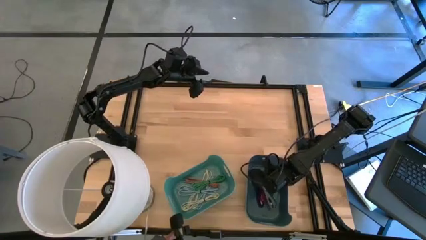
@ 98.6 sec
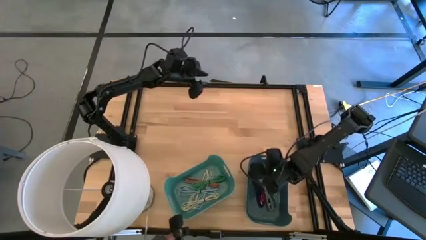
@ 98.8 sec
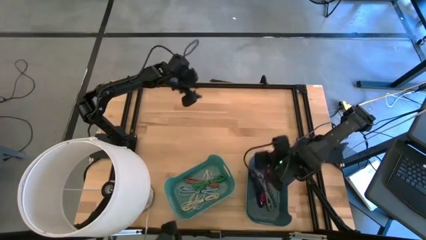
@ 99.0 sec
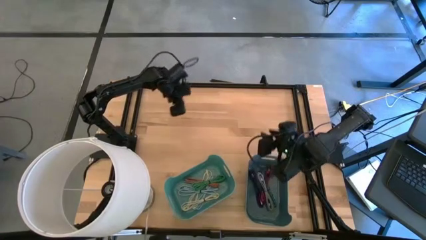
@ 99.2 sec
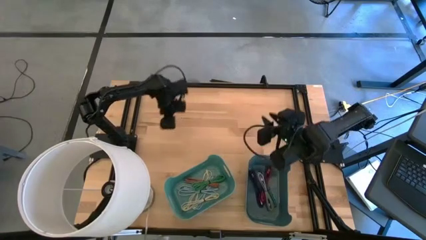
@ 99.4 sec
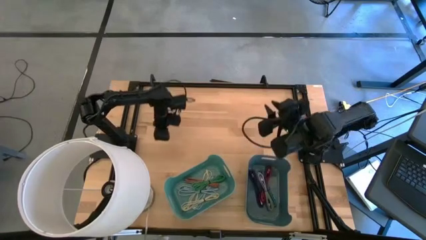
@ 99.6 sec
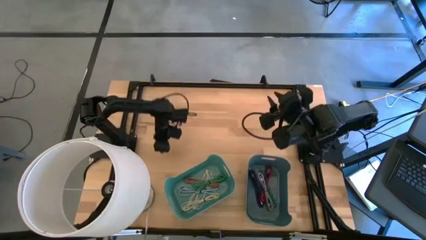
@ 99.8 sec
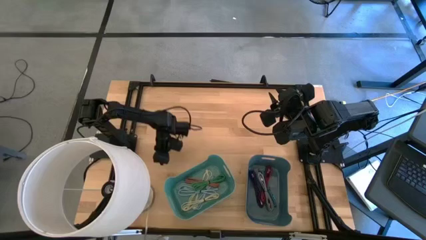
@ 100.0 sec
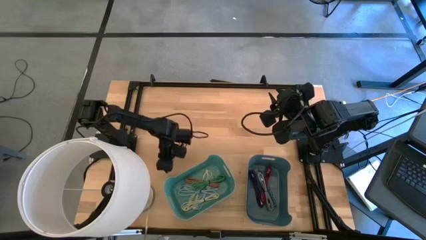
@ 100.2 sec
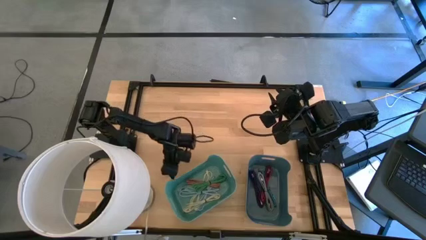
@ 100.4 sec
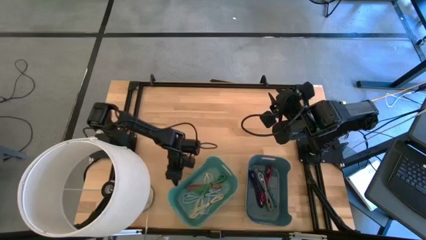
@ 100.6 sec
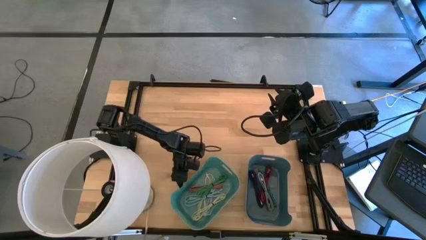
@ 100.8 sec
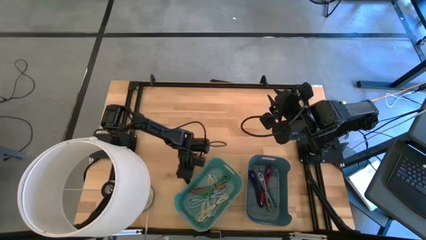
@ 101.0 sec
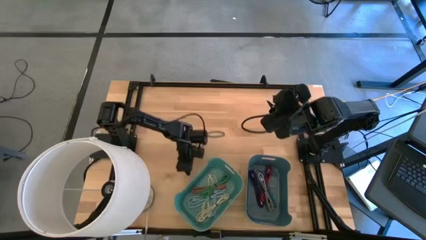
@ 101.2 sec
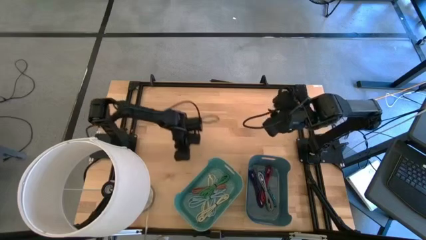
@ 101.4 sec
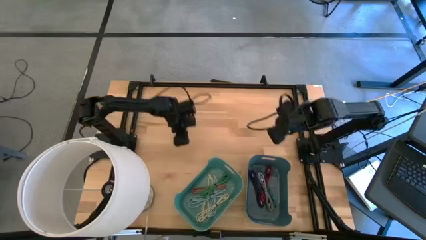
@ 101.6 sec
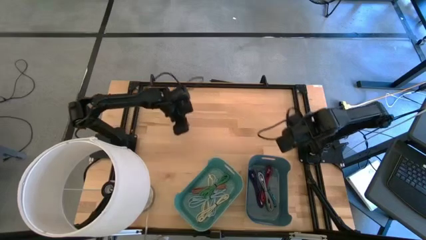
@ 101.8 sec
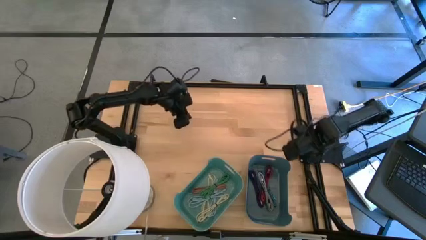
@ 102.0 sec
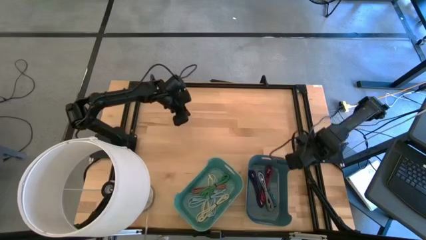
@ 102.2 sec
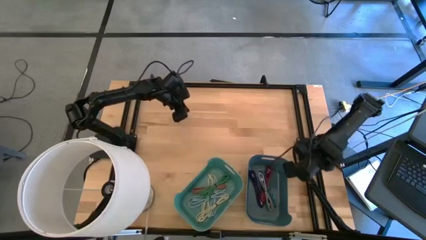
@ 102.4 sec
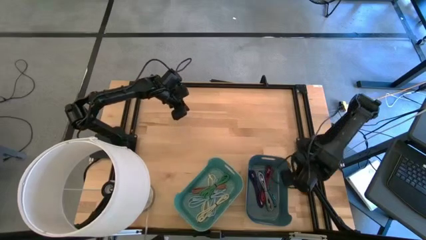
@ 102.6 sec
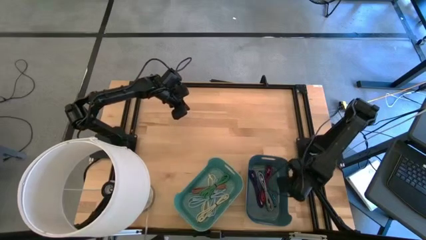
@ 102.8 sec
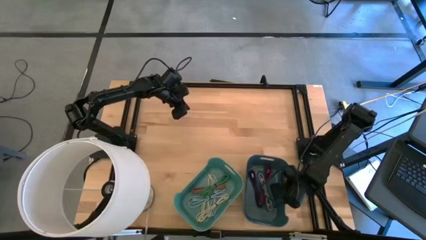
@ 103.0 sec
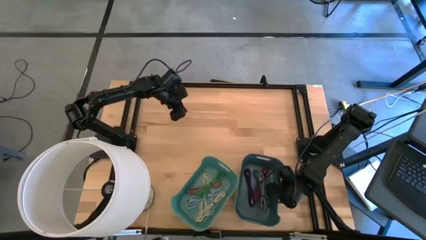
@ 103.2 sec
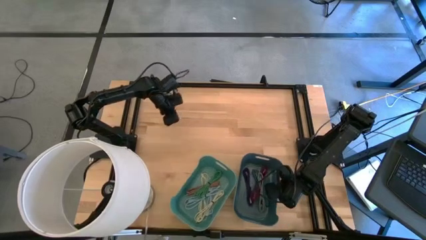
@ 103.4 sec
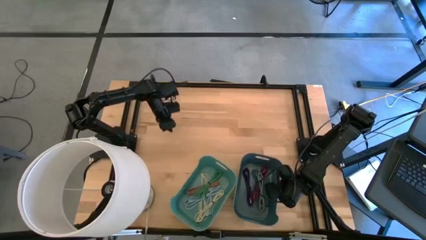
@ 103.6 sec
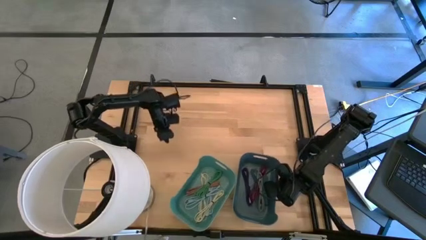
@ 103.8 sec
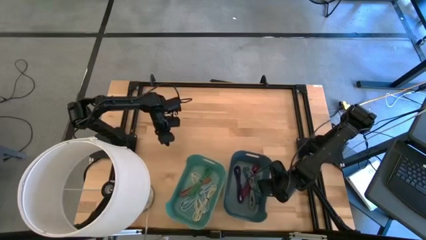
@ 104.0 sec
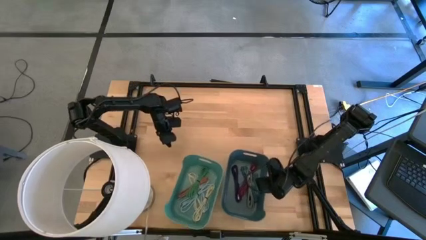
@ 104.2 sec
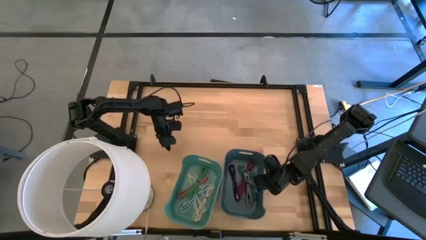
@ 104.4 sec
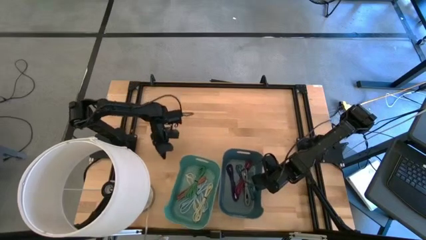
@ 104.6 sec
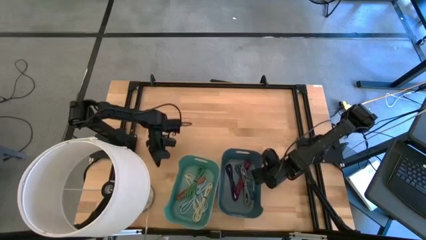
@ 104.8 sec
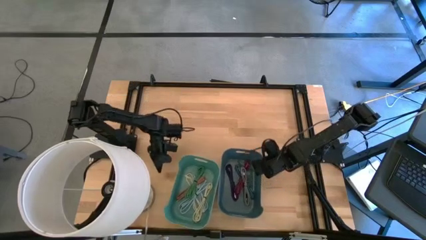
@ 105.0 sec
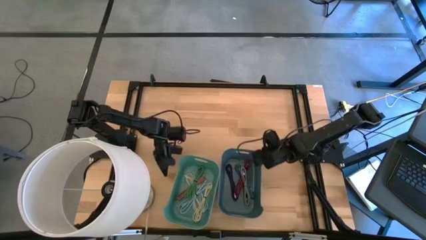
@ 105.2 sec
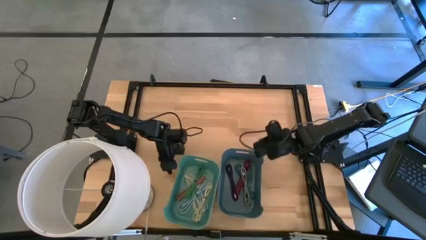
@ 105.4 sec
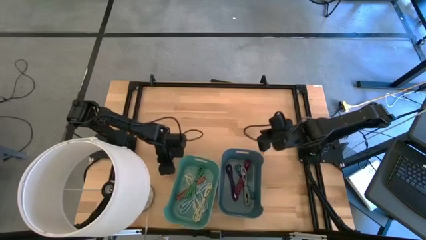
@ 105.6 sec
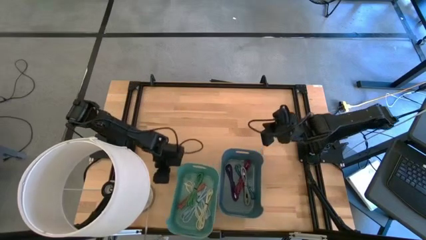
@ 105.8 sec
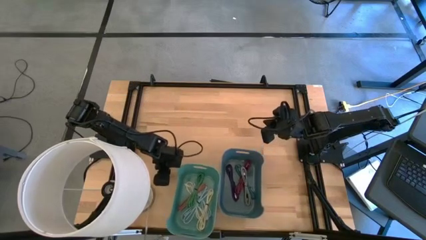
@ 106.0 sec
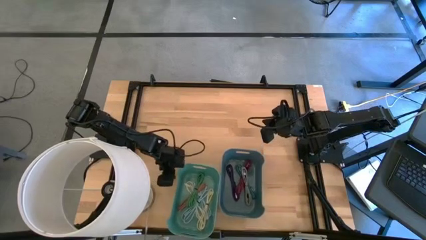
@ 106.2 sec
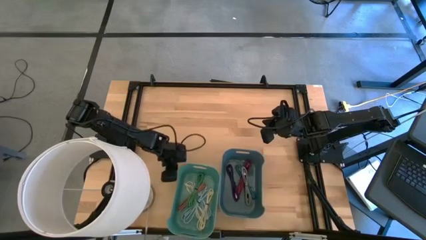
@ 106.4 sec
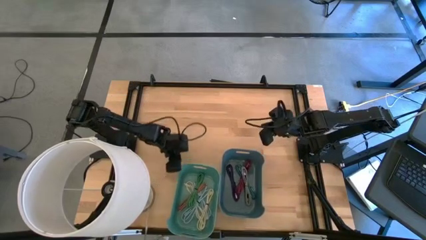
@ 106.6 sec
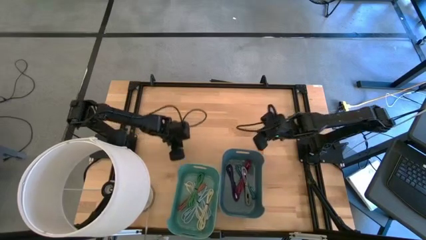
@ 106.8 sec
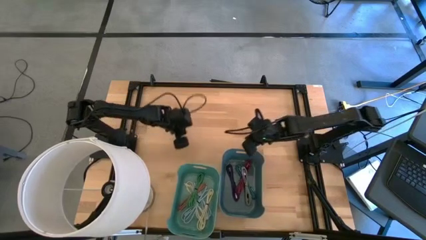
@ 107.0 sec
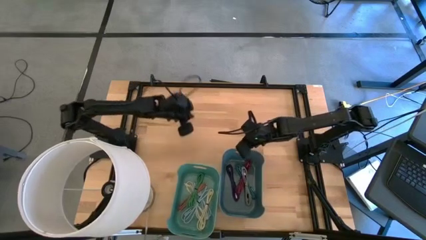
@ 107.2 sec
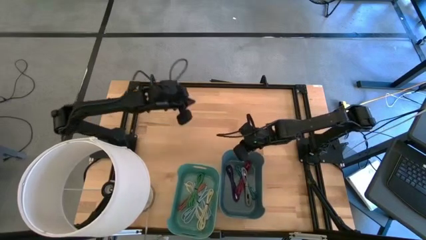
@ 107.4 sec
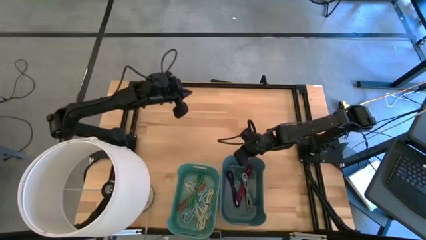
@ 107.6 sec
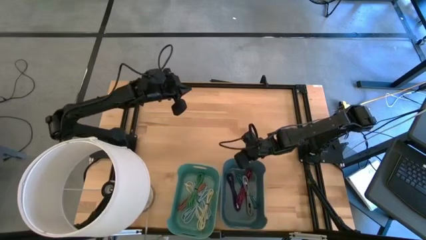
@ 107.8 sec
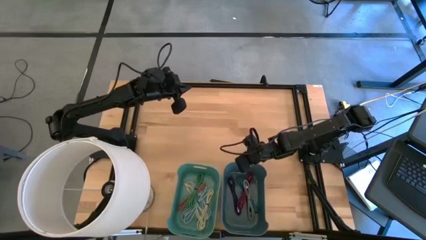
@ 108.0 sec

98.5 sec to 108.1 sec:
Adjust the bins

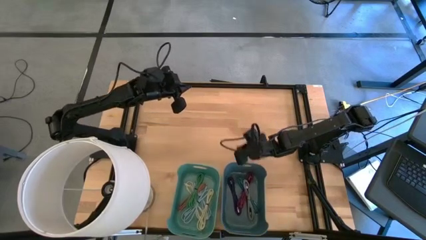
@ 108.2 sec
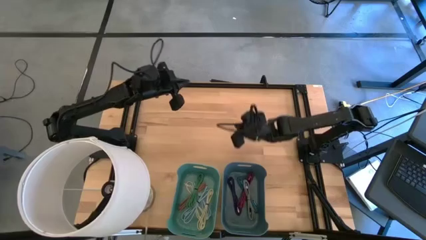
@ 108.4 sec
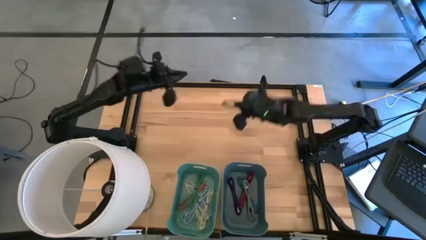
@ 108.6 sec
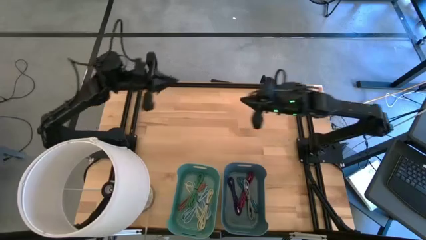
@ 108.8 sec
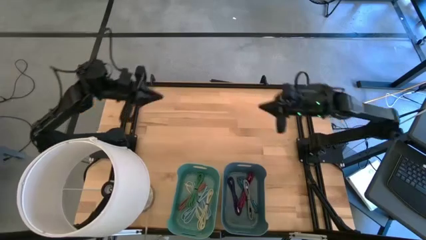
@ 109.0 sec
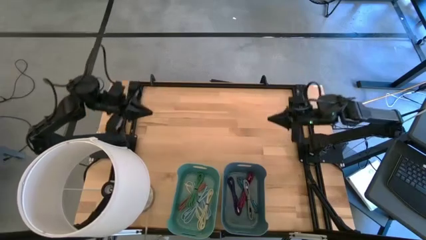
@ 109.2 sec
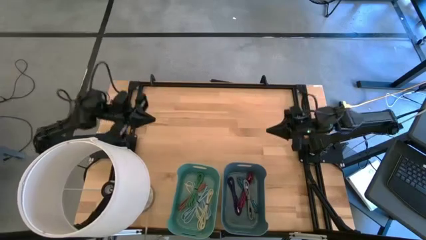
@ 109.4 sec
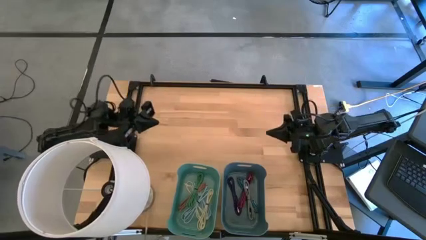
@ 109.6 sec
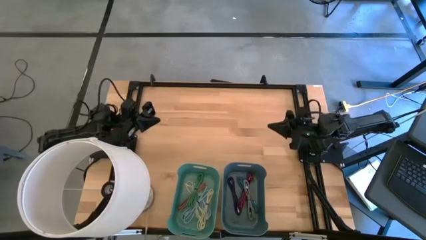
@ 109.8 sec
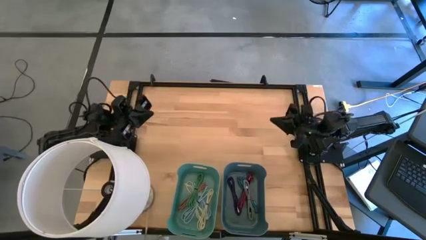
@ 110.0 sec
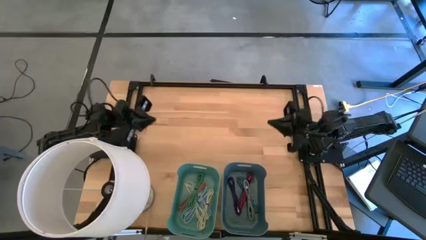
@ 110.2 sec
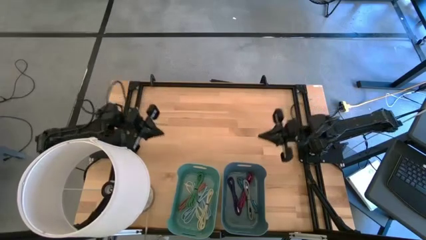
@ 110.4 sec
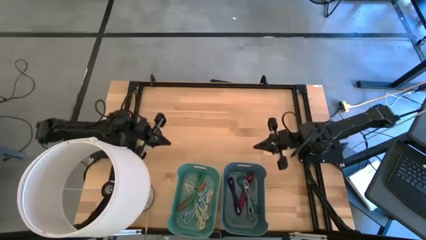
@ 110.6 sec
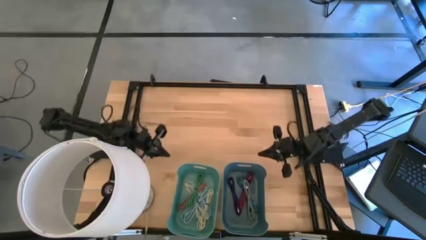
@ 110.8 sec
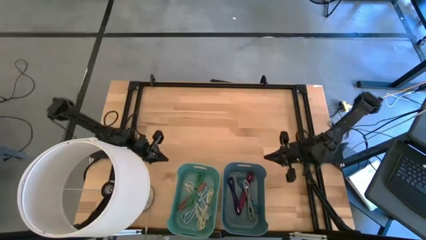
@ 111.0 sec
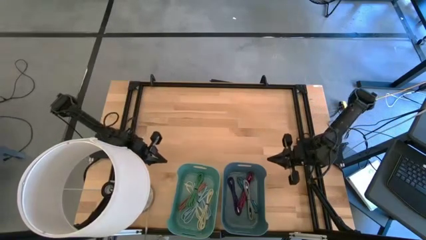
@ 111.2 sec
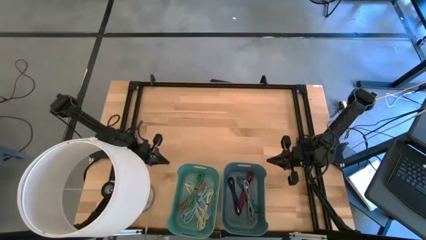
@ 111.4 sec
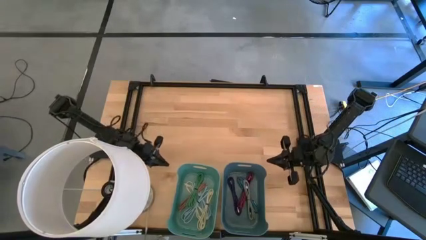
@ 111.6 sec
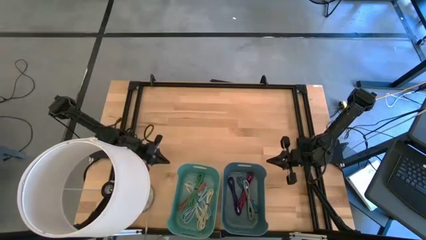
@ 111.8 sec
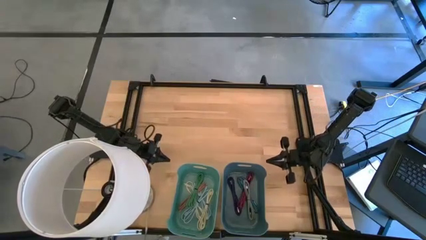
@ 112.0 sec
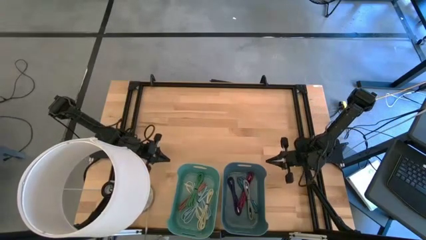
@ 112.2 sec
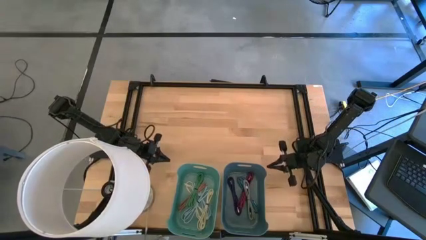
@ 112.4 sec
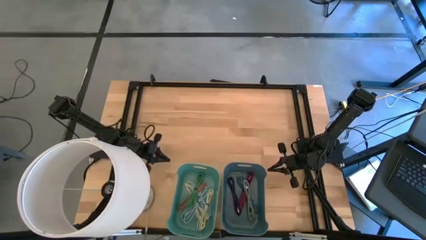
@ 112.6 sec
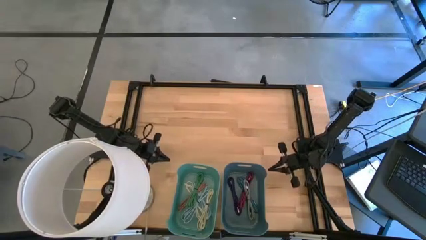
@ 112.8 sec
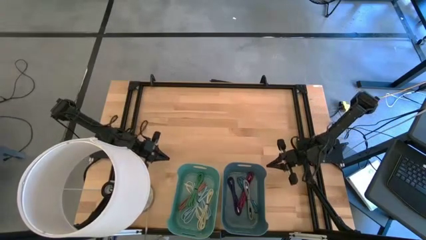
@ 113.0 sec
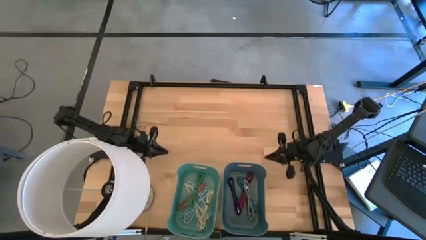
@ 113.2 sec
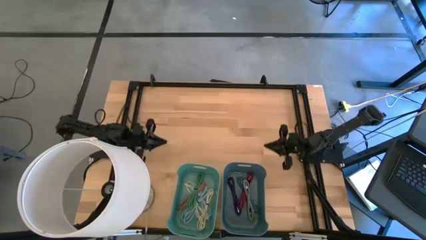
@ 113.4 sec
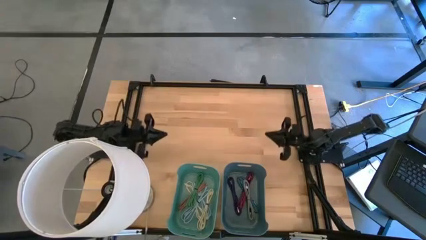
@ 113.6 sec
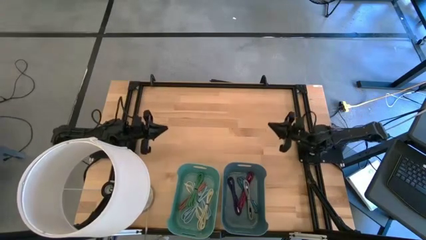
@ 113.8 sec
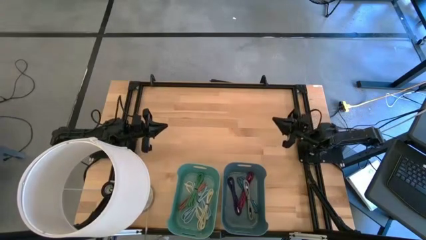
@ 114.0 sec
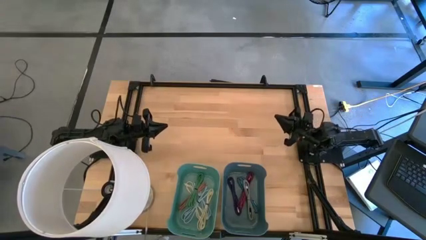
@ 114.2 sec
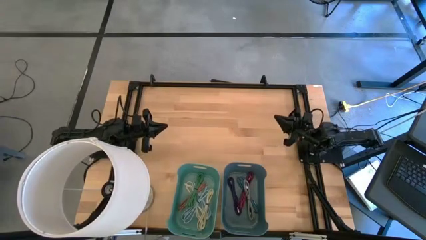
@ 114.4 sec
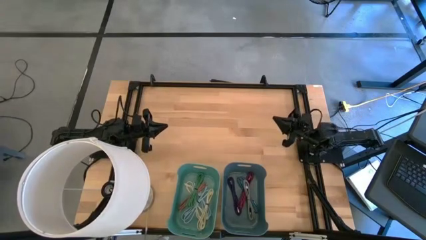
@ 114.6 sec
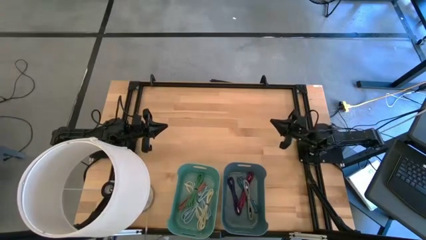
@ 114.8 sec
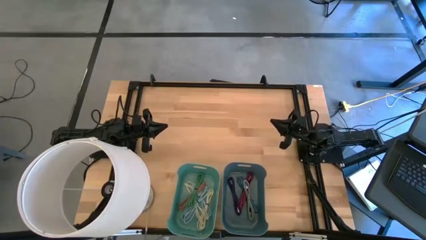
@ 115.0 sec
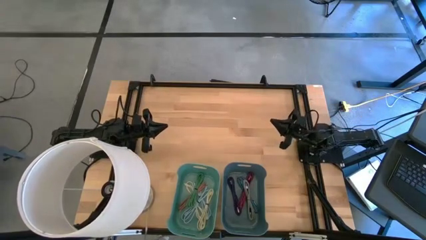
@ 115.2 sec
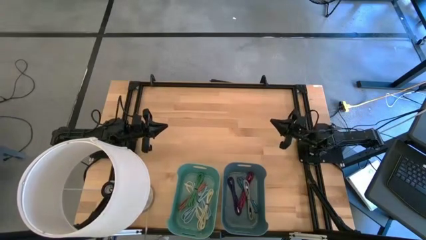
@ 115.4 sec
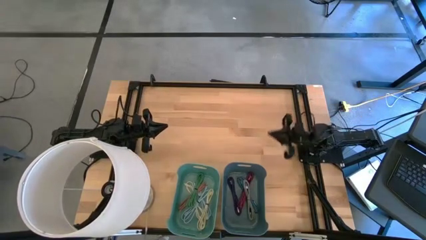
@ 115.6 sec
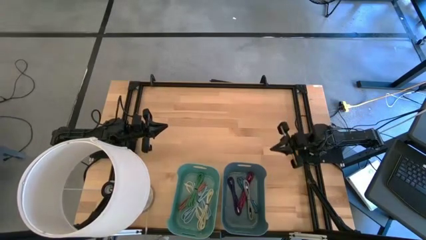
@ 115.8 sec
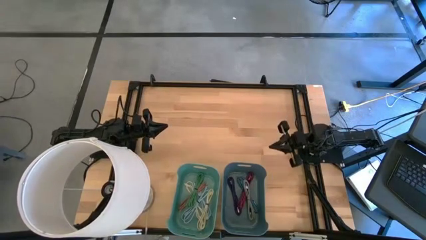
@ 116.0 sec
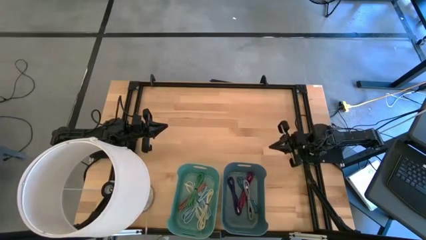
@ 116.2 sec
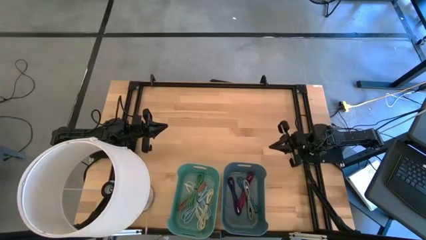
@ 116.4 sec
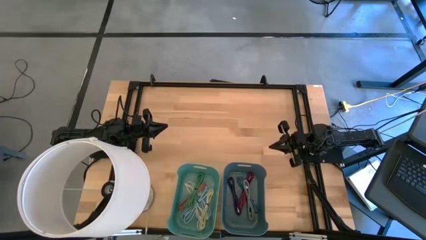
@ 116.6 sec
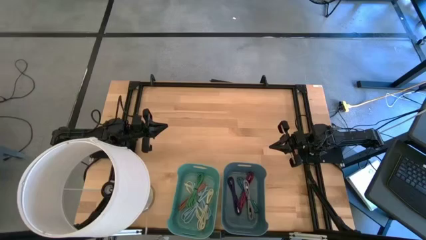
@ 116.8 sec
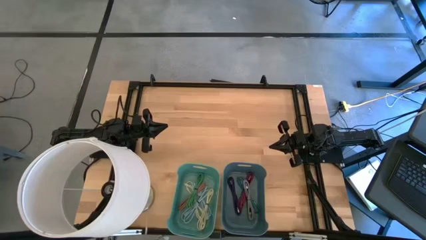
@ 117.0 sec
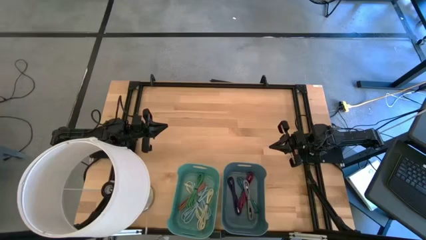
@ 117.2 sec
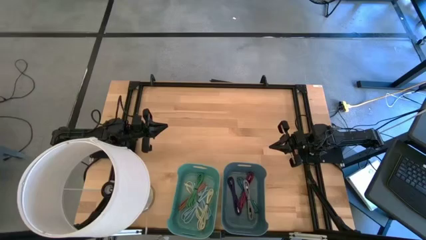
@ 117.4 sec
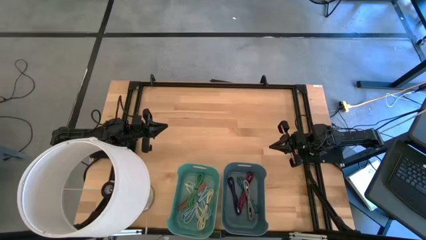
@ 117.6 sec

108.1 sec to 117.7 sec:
Return to Home Position
